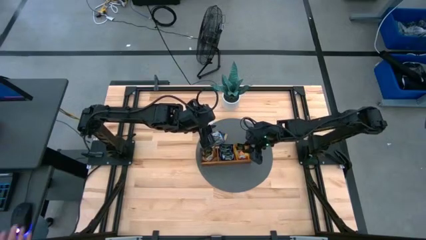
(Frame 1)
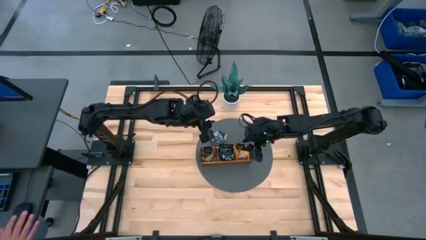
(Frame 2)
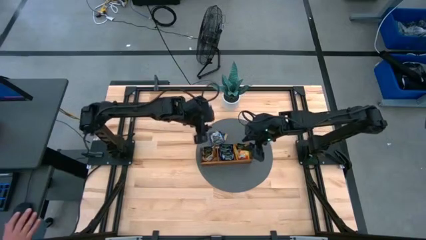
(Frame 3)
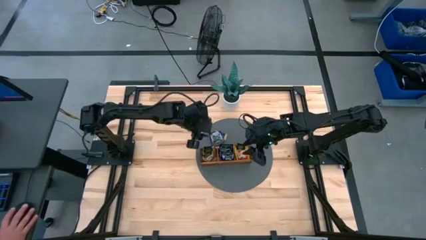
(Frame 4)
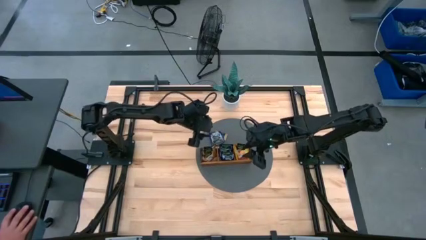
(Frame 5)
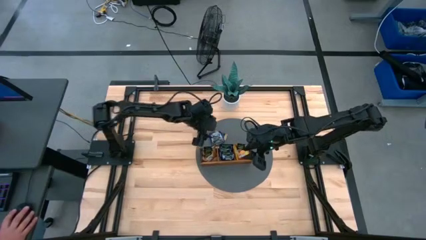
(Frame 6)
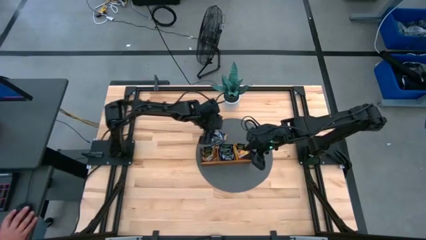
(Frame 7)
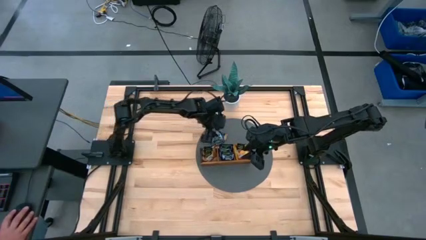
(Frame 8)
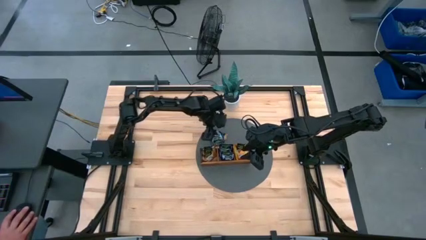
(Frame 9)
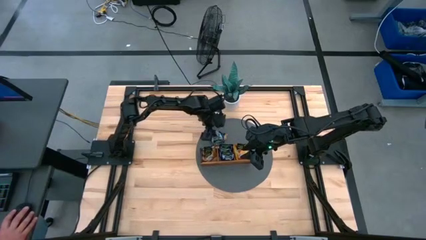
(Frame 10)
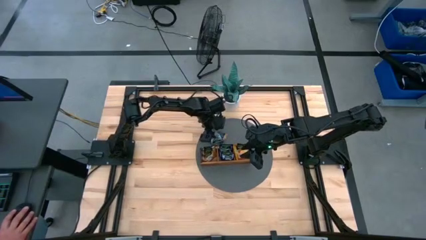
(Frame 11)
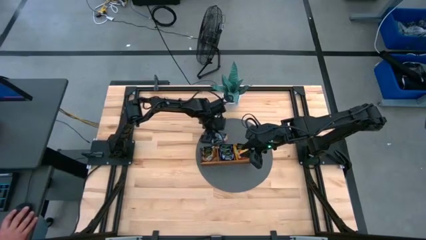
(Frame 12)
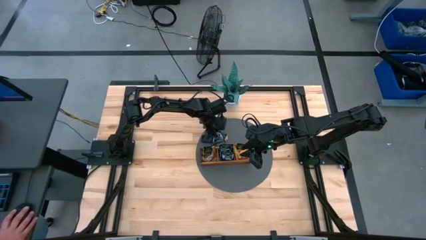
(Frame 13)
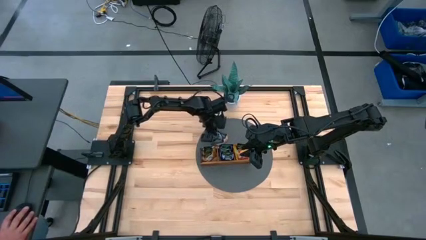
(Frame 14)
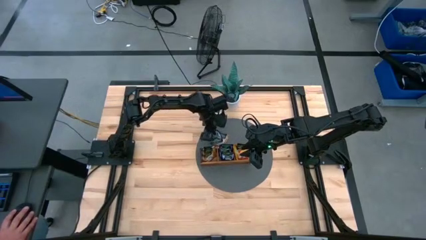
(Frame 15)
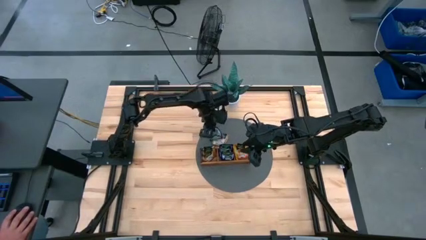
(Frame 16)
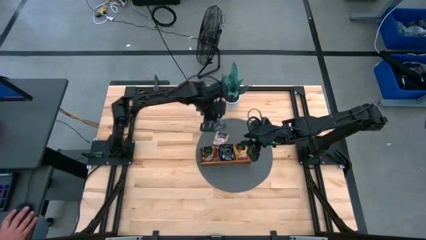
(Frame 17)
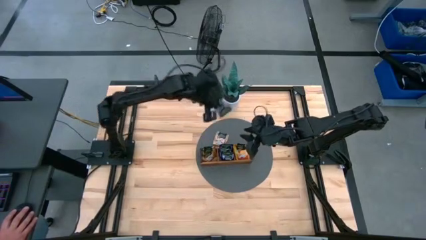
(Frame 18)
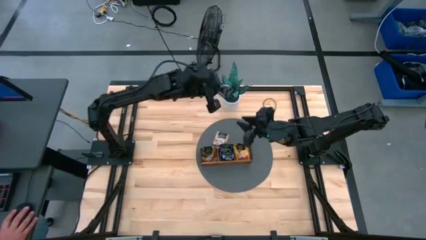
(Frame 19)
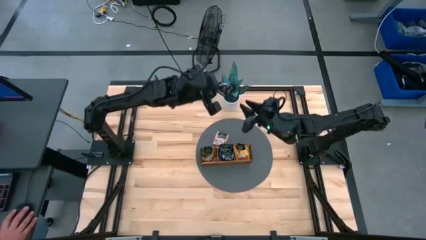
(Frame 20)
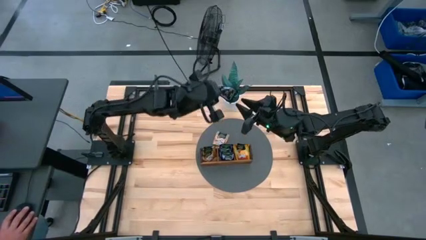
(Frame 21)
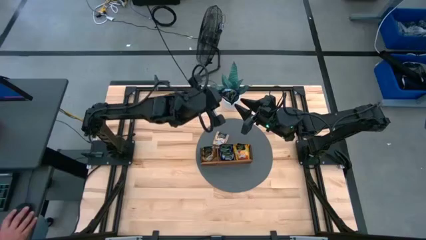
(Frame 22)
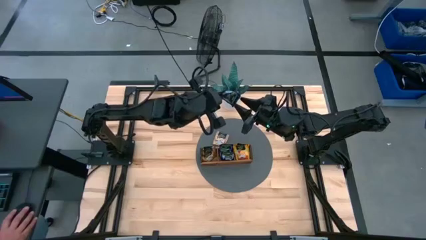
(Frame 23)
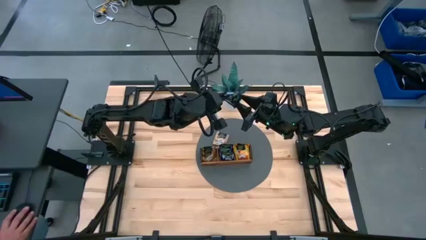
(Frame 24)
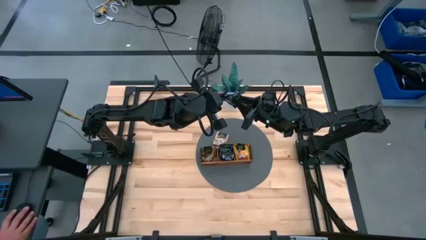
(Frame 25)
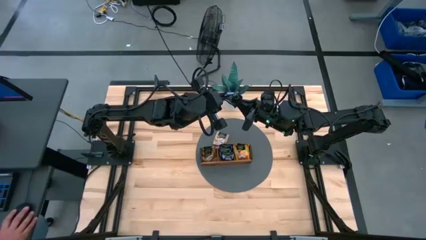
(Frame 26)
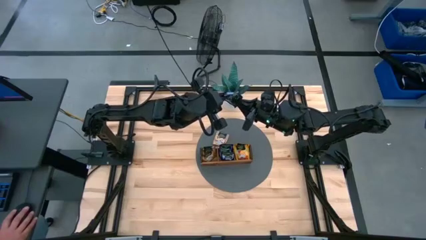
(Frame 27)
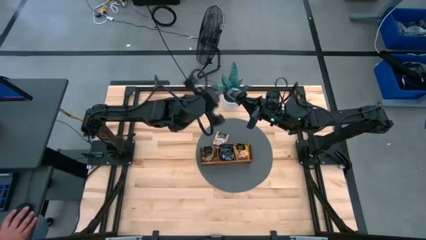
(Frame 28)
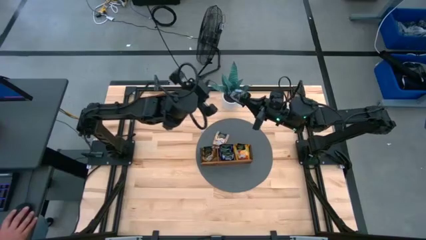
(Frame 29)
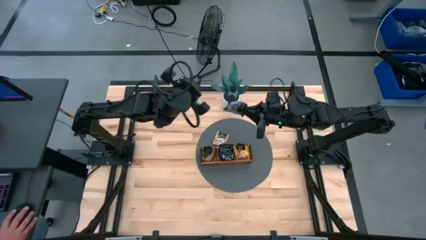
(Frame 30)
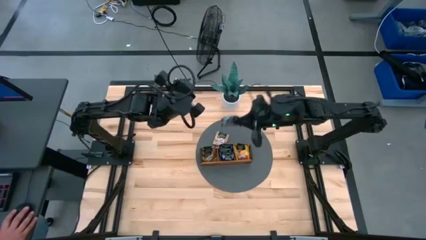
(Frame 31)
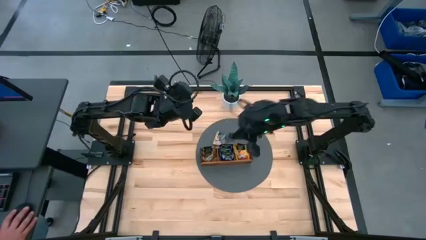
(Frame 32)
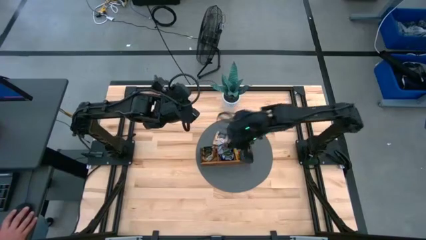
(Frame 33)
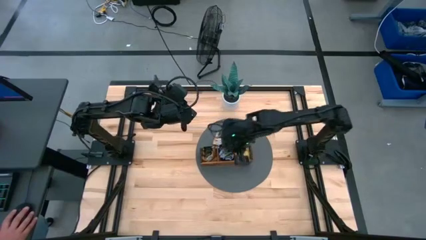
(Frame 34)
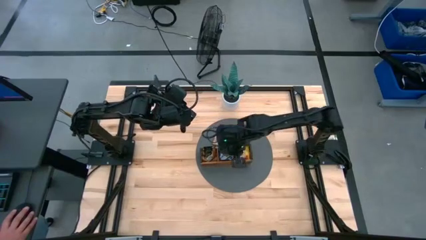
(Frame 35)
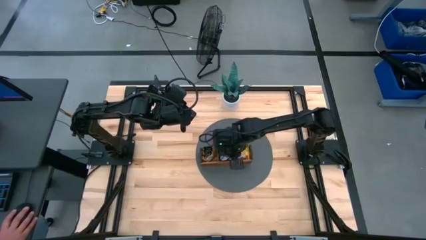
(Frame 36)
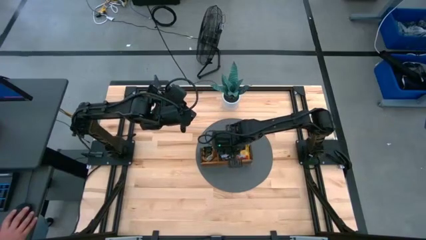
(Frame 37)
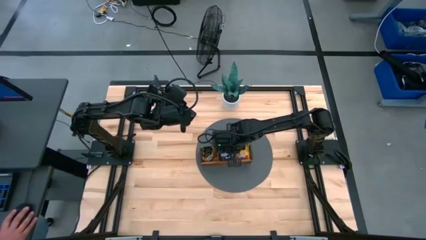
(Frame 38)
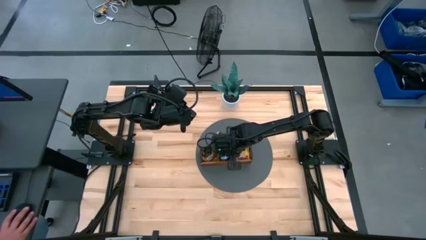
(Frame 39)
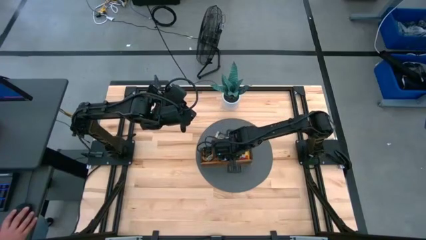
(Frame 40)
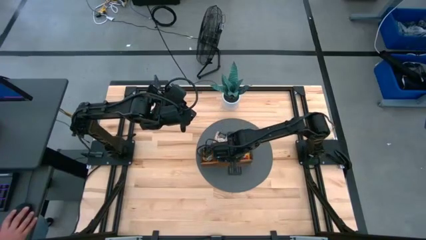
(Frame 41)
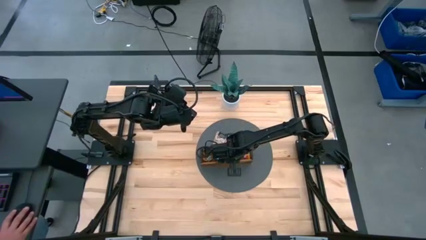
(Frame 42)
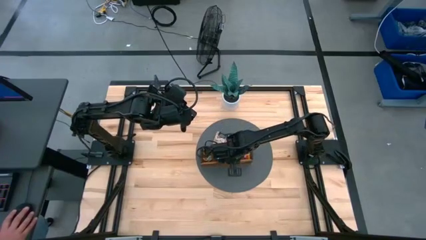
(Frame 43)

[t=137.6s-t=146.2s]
Task: Pick & Place Tea
Put the black tea bag into the middle section of the wooden organizer

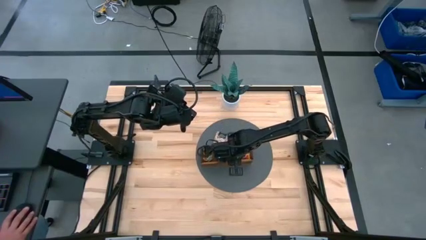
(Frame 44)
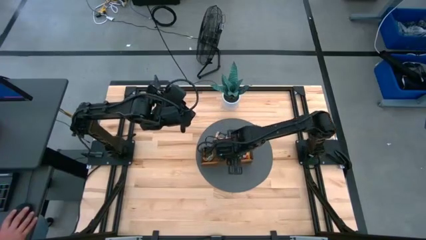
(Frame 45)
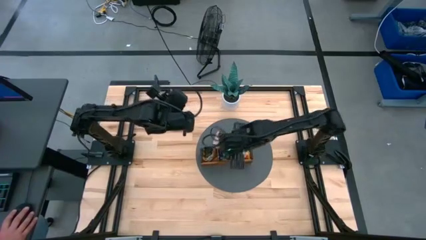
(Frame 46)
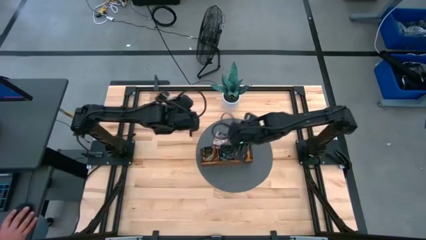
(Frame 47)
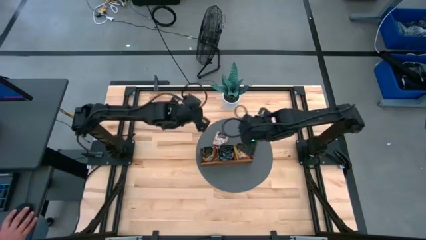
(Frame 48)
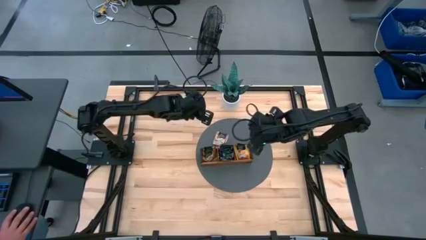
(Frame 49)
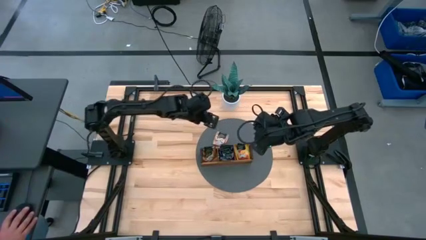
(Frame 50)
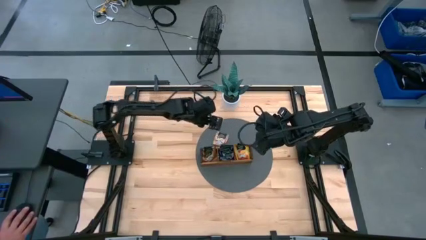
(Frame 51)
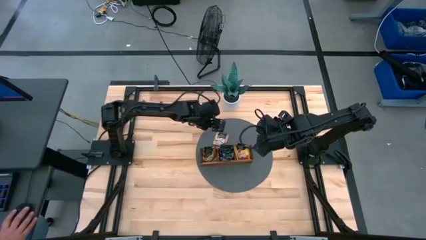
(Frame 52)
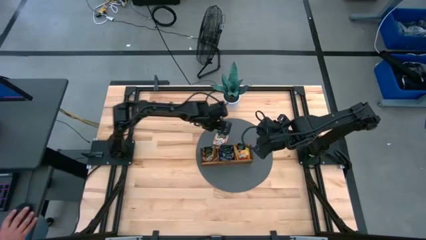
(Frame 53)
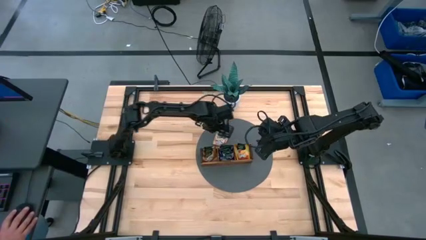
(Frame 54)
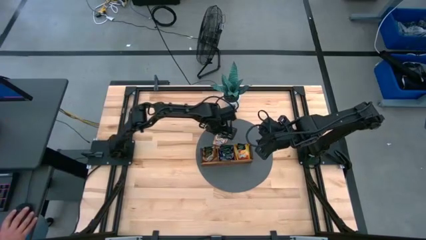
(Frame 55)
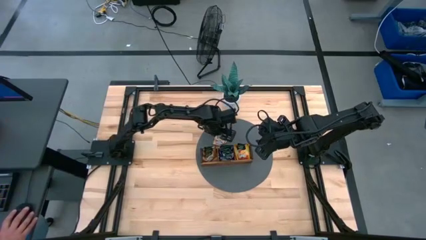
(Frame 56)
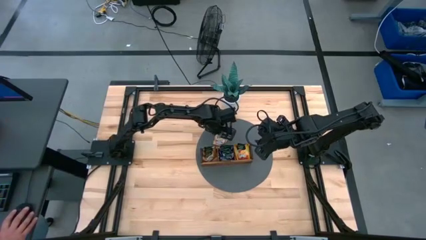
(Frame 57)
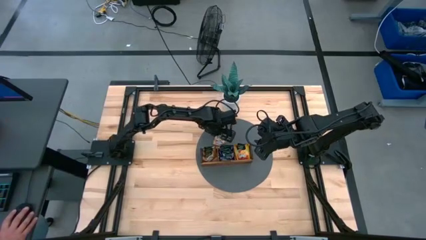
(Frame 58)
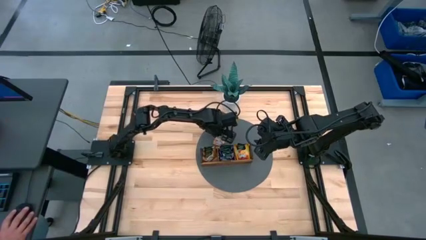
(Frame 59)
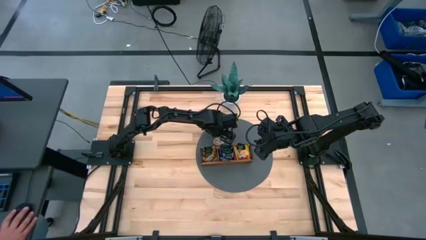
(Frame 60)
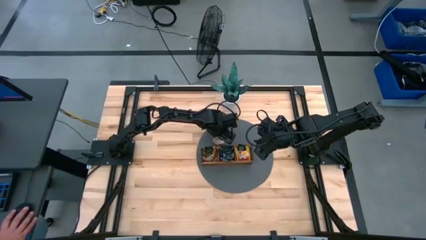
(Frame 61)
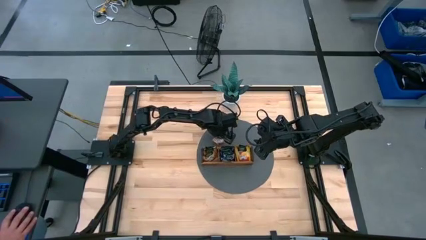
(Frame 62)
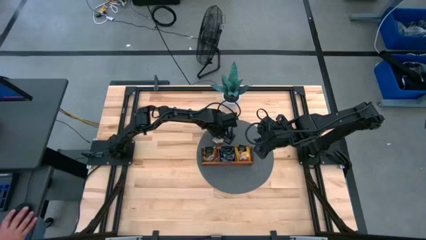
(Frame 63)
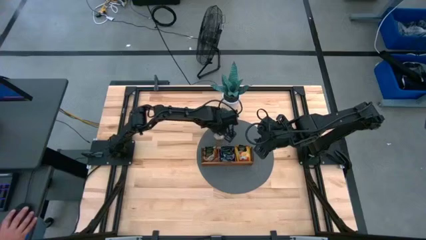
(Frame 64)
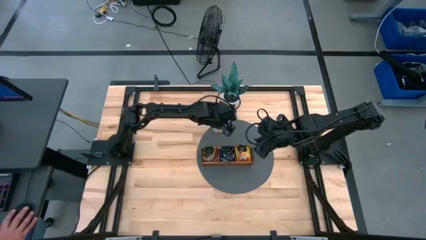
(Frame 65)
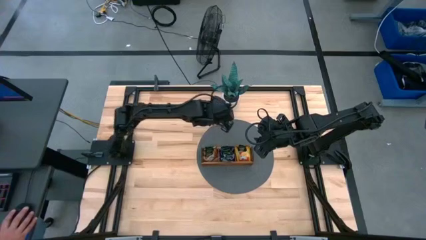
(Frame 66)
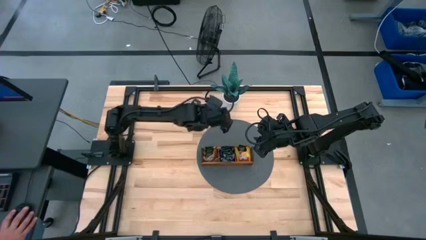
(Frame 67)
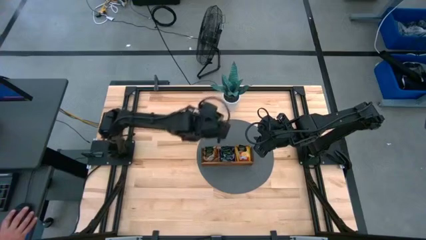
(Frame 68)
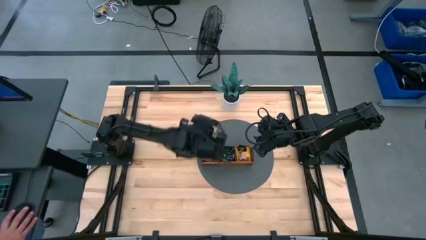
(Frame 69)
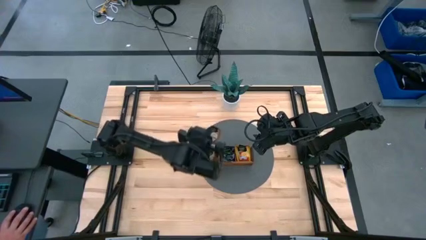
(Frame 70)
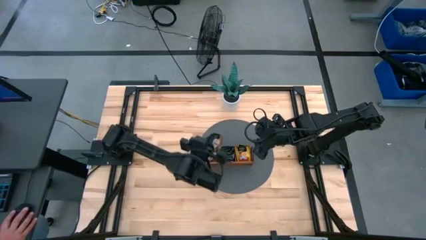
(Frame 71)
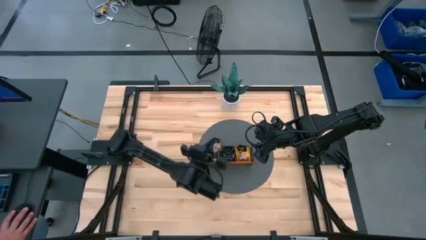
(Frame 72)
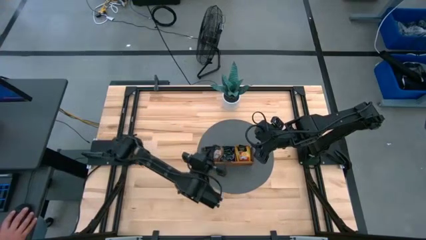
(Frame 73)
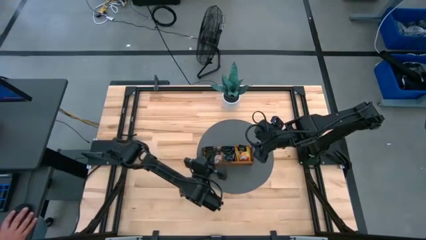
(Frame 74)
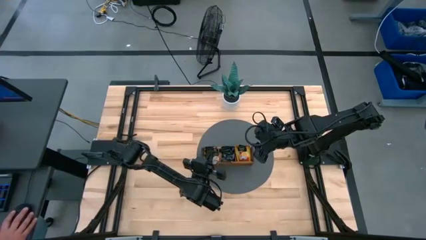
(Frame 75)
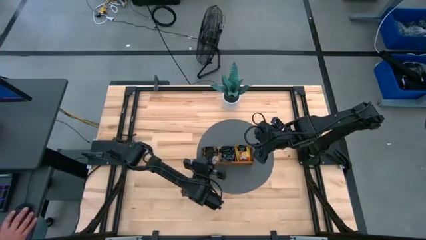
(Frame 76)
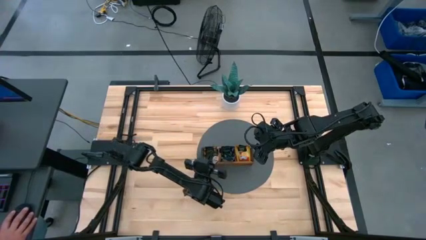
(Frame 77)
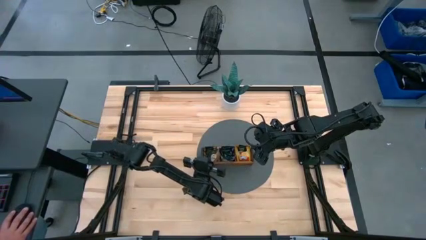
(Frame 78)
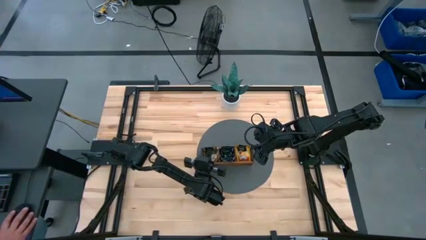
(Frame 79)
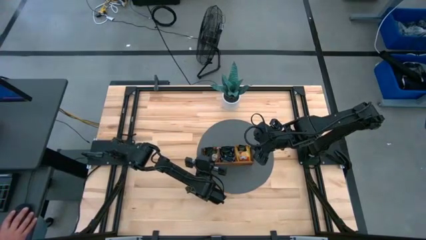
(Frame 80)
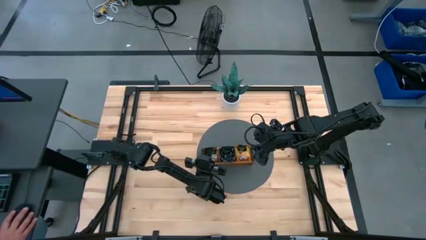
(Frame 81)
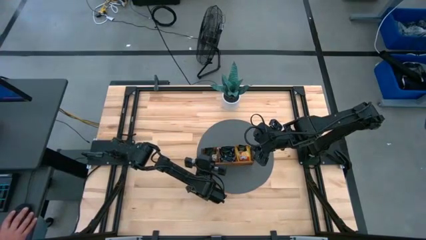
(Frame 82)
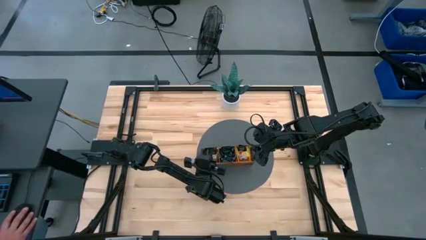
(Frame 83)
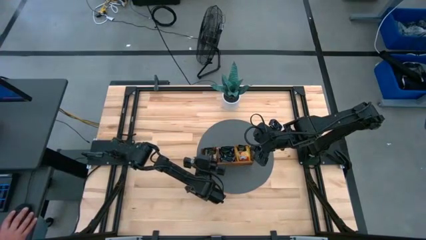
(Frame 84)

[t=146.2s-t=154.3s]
Put the brown tea bag into the left section of the wooden organizer
